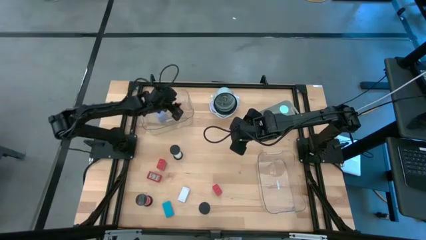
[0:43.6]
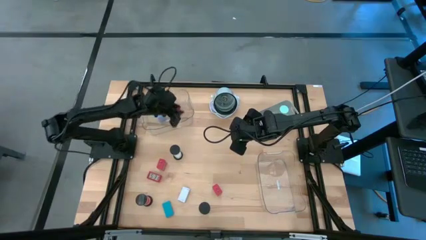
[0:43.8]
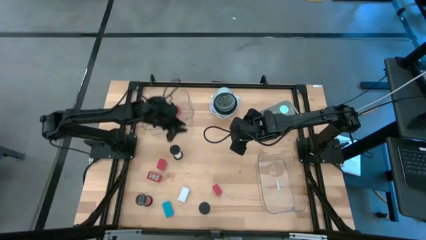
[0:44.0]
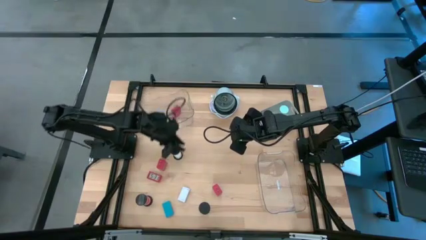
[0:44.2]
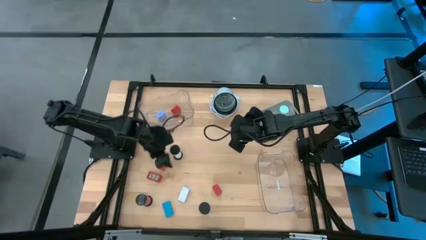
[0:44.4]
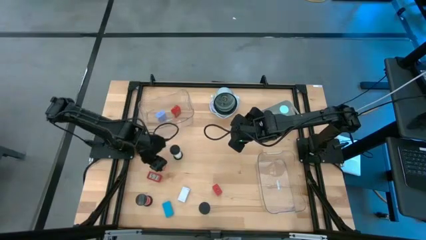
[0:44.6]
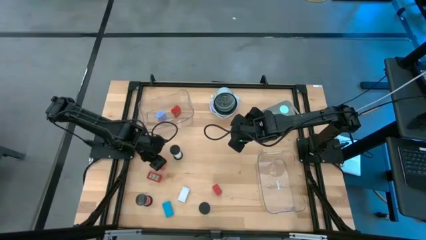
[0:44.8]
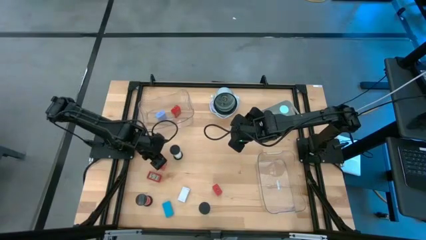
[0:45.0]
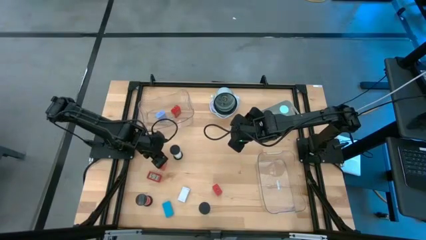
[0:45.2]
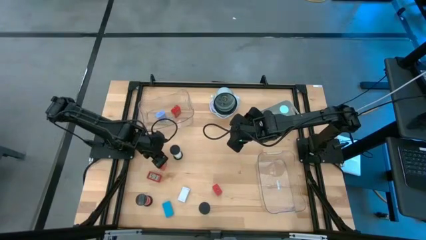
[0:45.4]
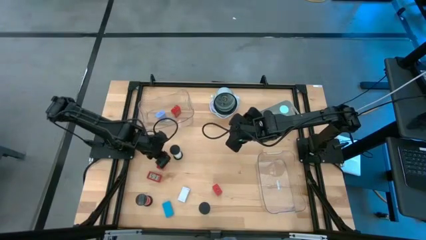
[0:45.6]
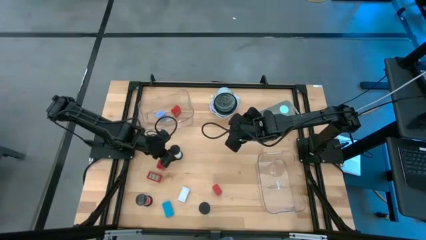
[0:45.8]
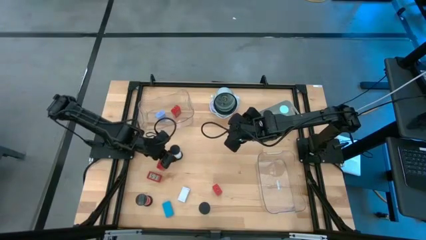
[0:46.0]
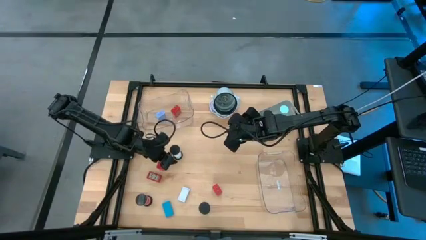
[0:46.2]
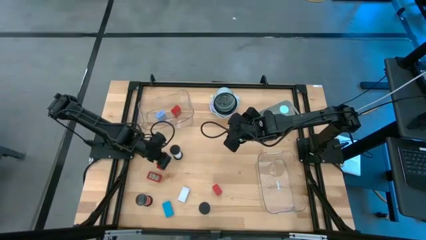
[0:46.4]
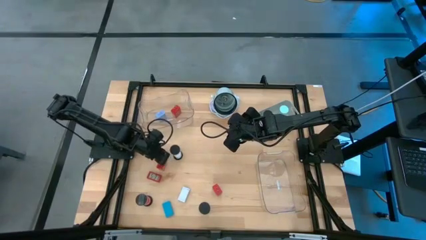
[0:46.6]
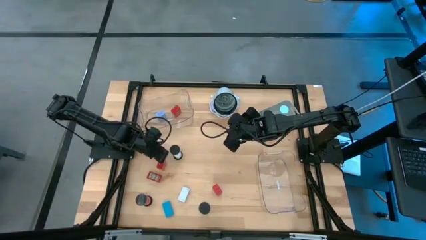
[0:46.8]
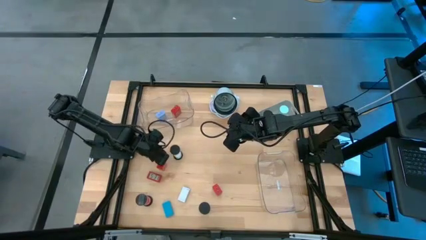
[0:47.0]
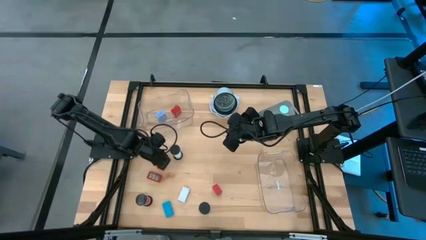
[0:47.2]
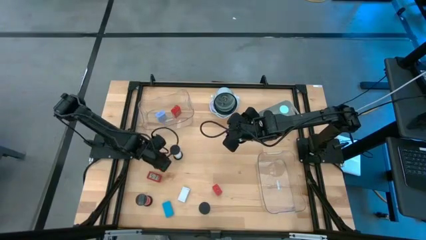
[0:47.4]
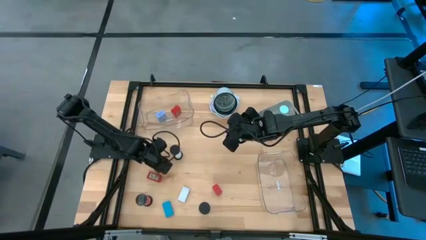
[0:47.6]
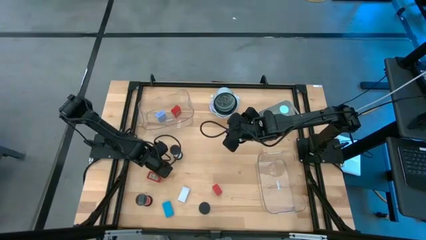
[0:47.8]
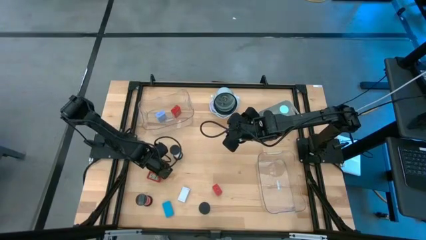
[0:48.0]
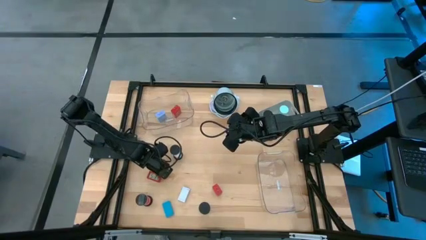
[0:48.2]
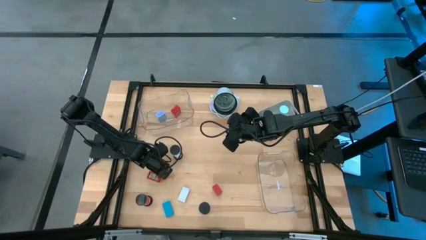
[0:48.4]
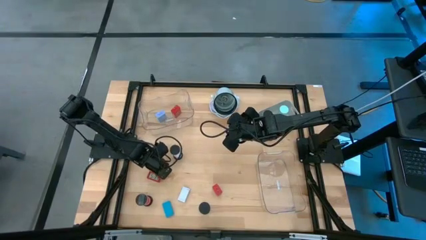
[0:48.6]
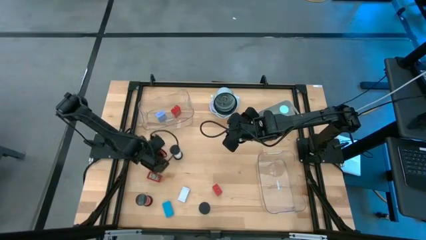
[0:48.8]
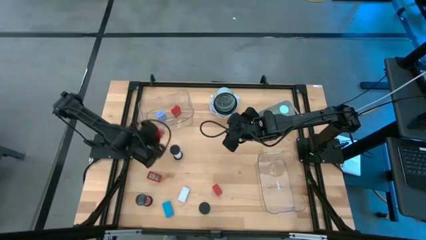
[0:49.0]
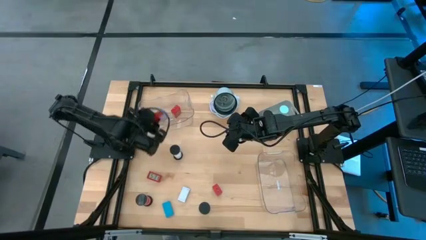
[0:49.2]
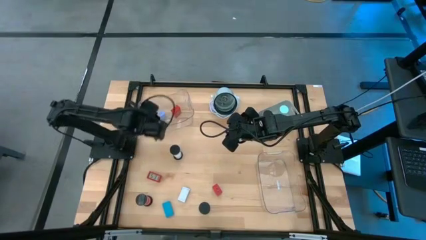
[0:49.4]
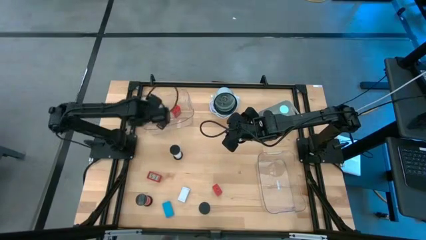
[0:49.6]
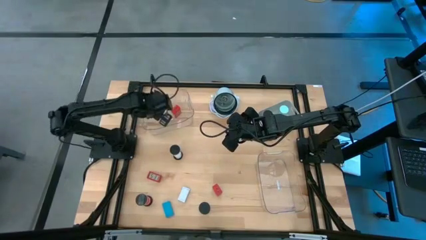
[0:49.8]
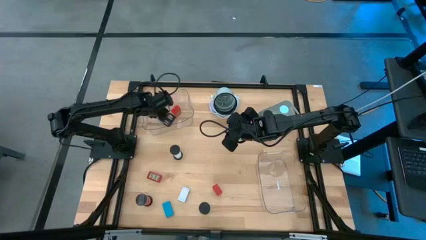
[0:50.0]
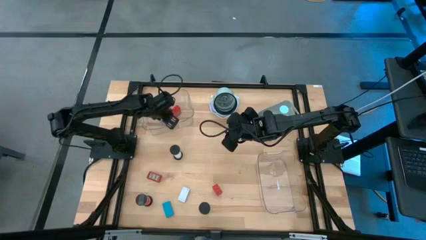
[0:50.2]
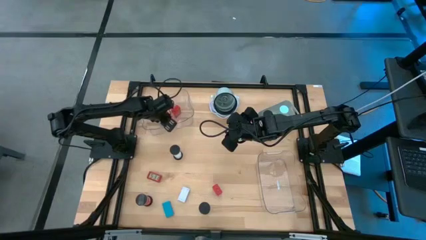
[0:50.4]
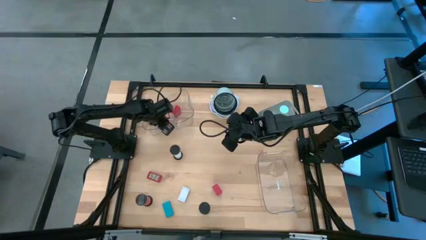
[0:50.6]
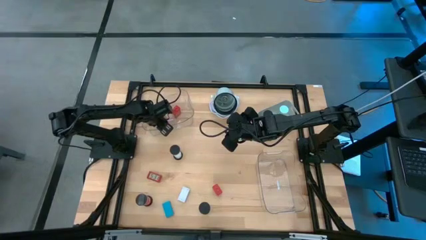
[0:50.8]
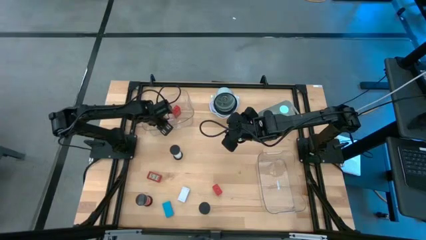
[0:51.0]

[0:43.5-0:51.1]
Task: Pick & Place Office items
Put the left red charger adapter into the left transparent bin

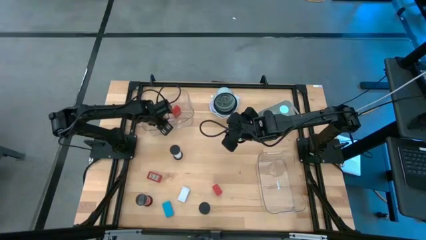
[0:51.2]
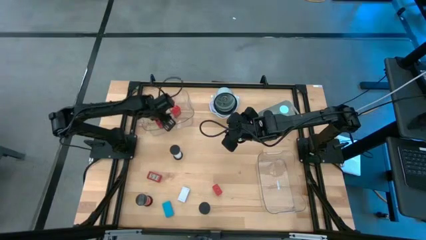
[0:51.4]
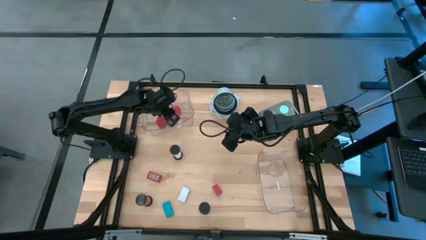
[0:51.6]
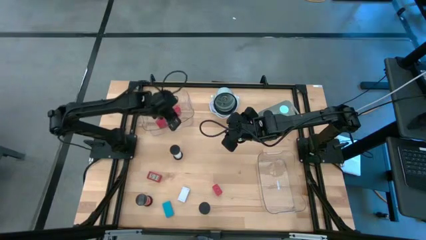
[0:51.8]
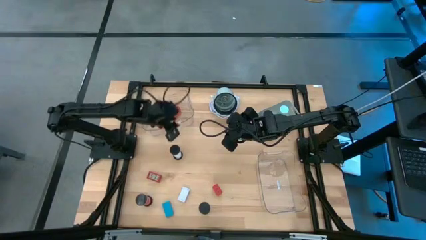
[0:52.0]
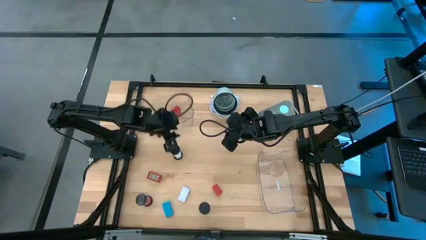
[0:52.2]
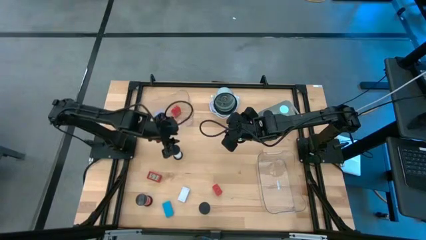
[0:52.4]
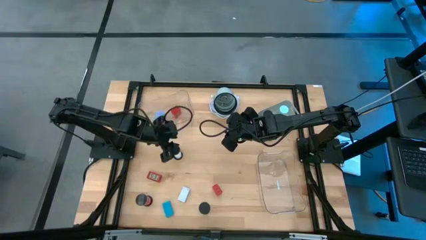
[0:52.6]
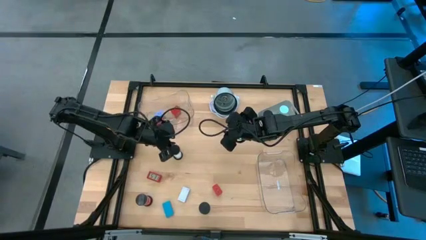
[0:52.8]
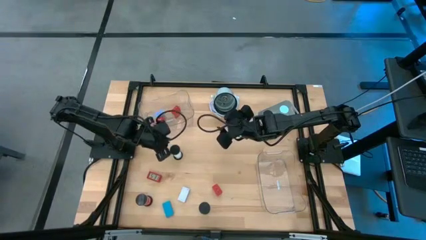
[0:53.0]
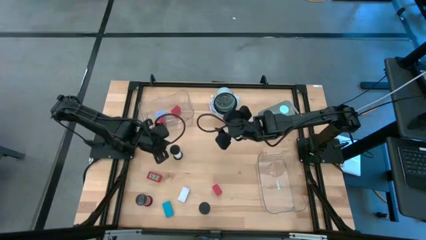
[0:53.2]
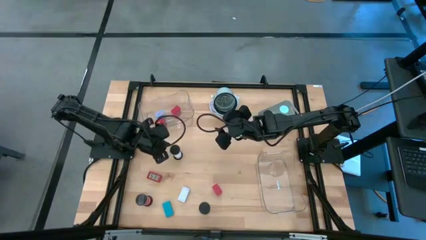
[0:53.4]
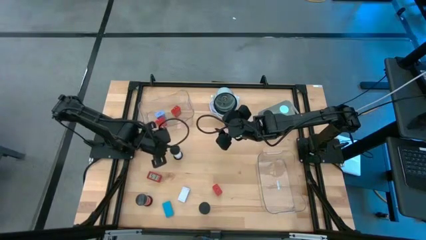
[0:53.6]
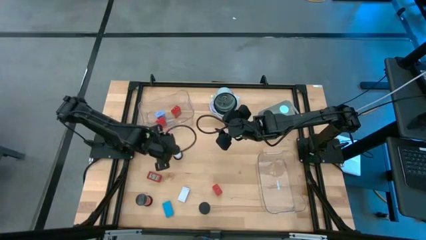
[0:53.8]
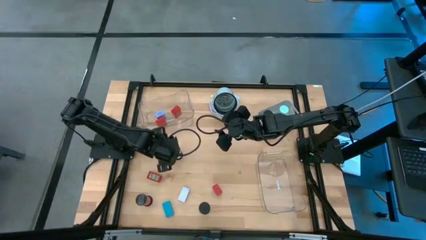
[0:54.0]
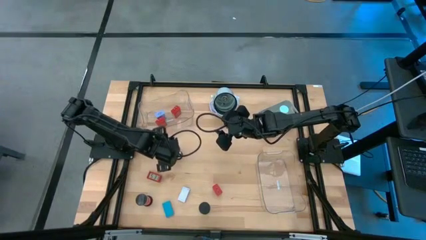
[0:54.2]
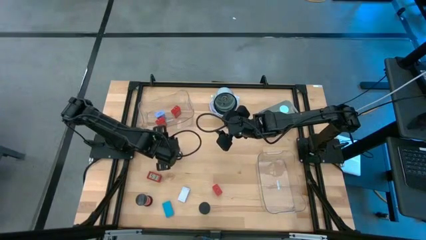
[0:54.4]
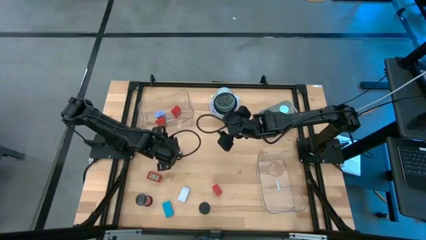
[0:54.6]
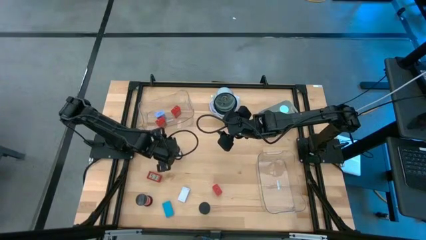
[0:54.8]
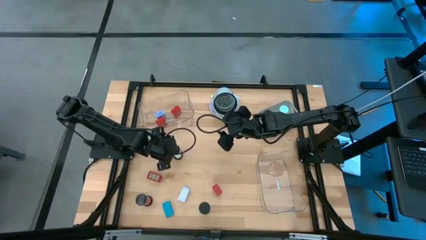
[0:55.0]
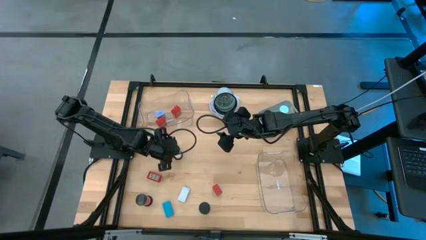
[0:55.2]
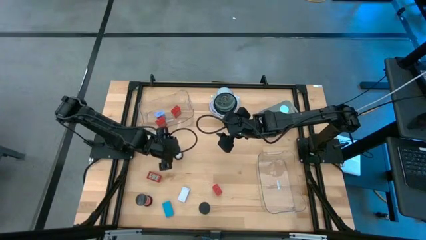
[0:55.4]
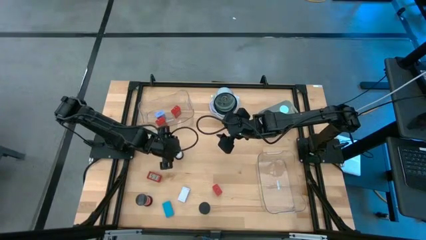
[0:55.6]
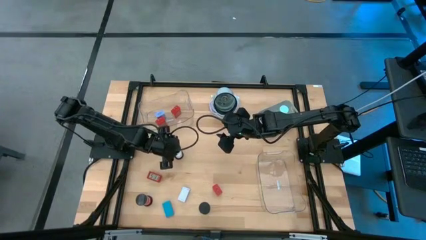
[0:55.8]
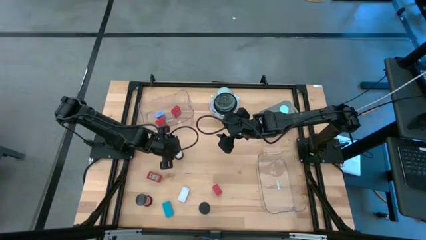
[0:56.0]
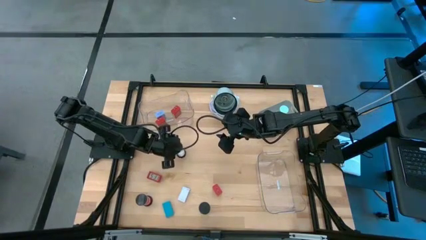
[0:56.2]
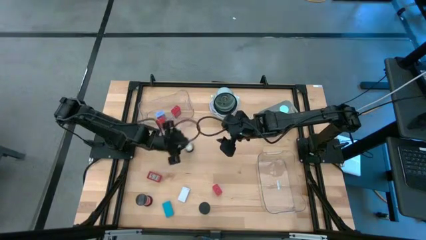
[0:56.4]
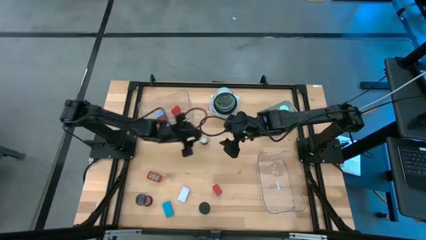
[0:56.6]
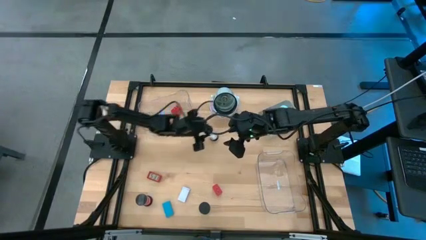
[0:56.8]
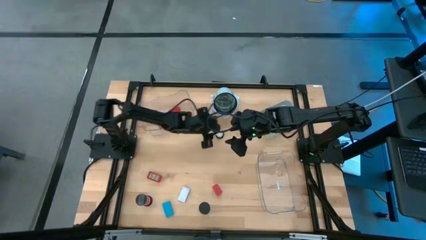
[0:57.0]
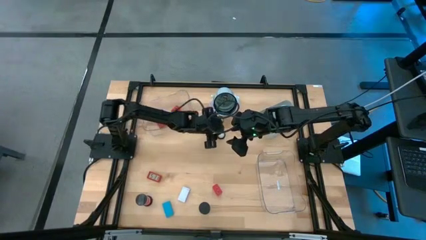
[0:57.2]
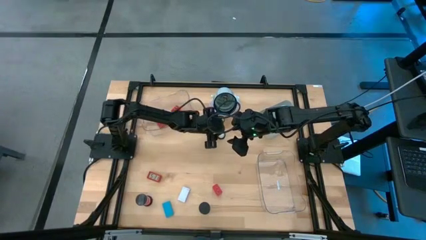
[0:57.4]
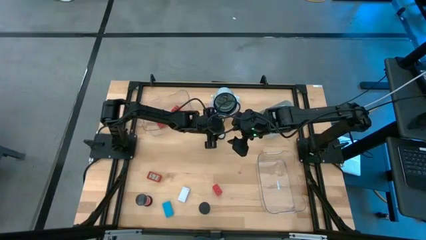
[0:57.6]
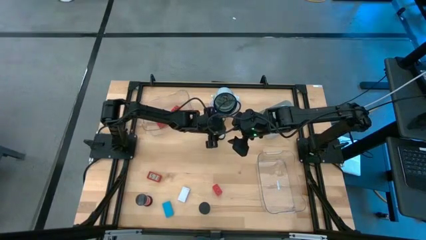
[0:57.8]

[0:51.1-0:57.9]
Move the white hourglass to the top middle of the table

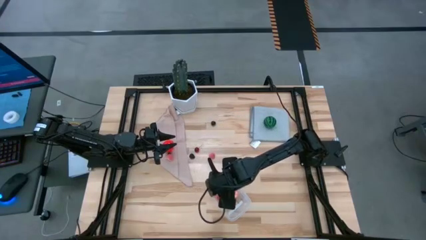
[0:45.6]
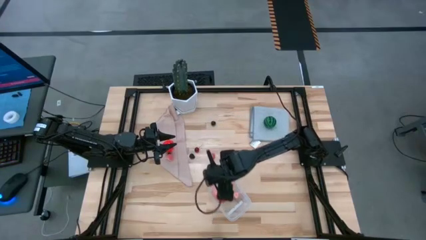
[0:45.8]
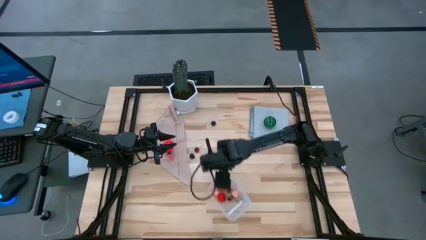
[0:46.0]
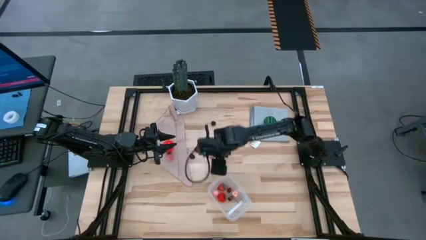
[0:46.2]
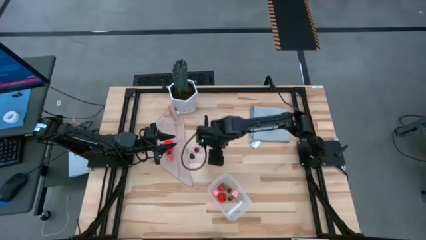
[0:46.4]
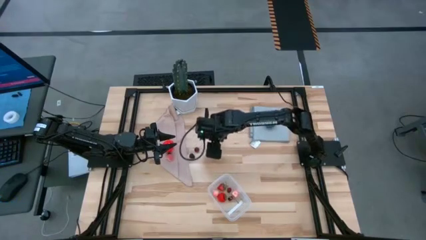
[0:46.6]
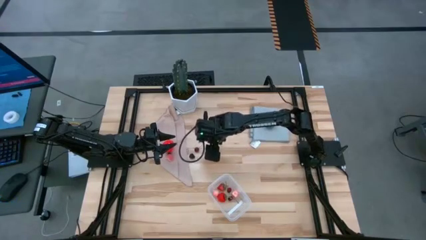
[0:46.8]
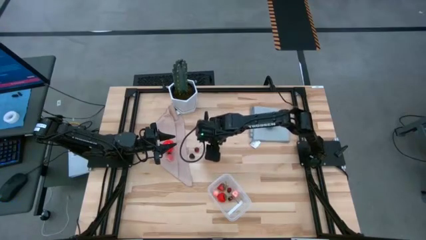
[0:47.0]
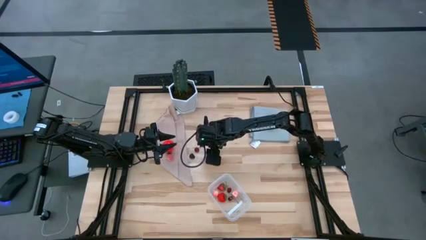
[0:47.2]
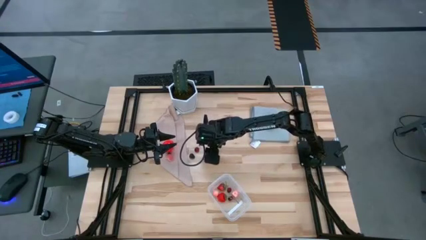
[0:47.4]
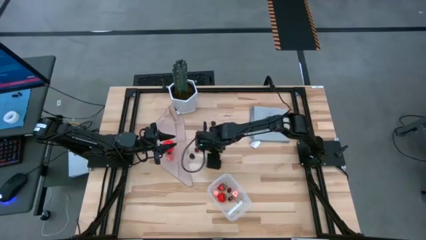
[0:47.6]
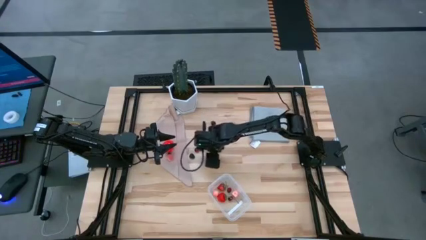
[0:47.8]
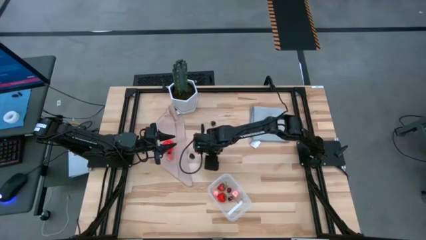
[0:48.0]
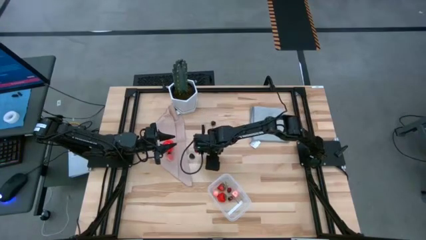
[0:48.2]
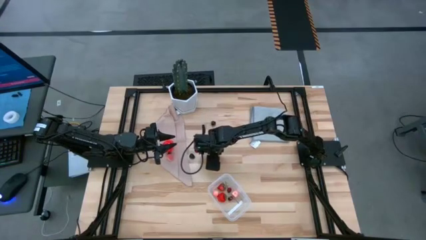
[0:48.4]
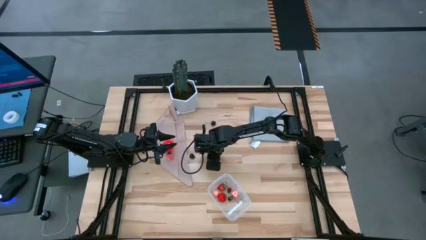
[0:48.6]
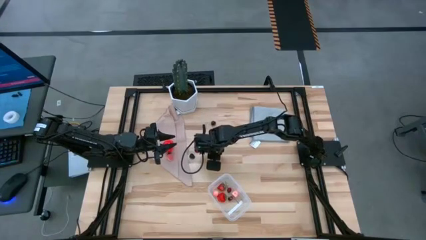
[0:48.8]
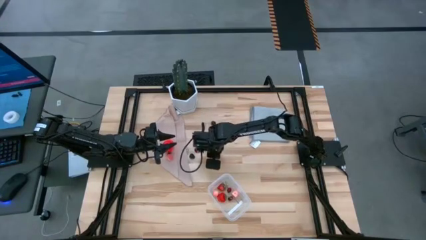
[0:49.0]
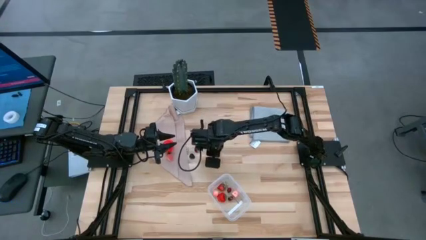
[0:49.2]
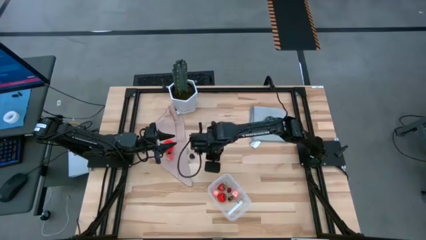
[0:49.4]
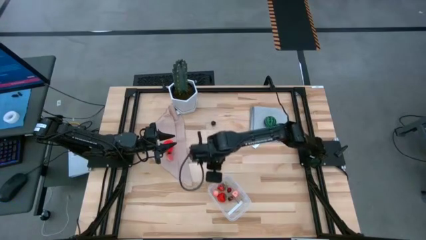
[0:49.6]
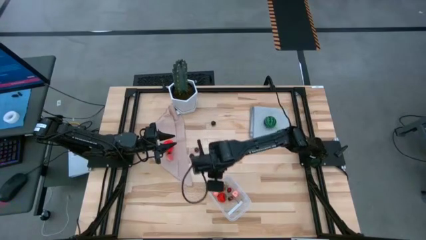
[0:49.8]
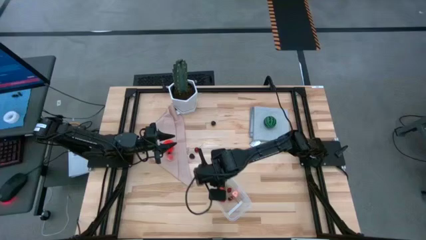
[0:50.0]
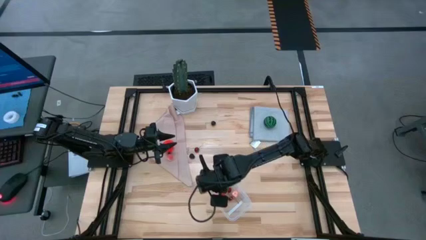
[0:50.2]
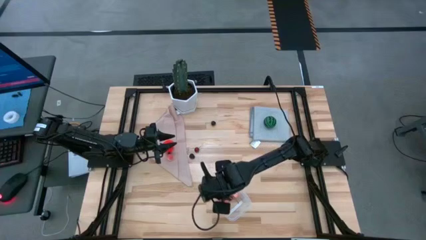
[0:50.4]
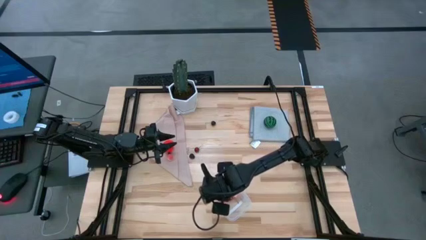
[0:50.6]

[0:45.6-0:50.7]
Task: Pick and placing Produce into tupperware
Put the right peach into the transparent bin
